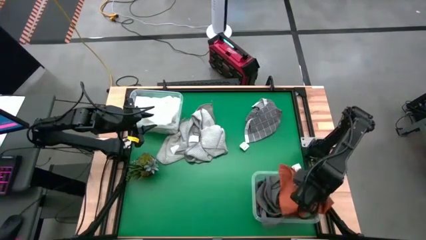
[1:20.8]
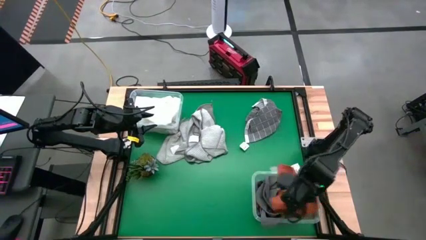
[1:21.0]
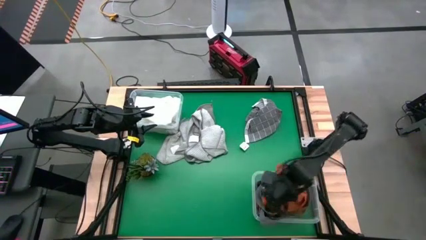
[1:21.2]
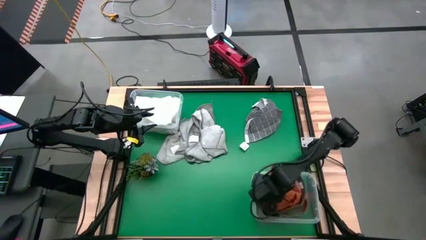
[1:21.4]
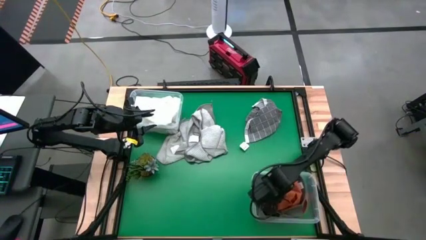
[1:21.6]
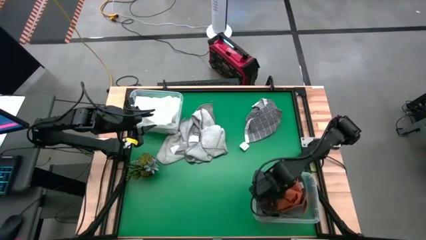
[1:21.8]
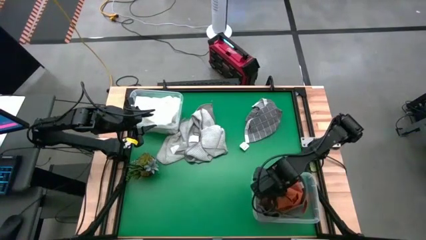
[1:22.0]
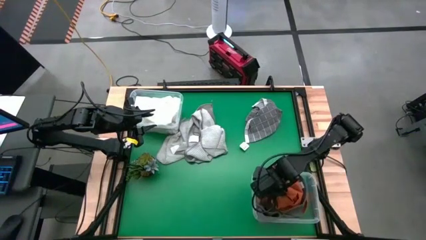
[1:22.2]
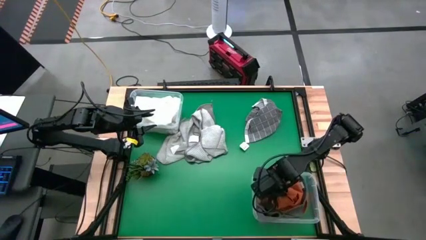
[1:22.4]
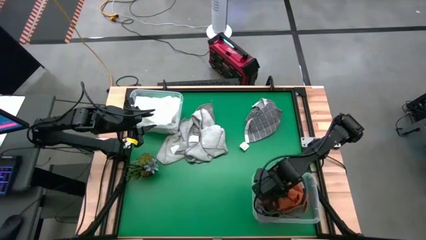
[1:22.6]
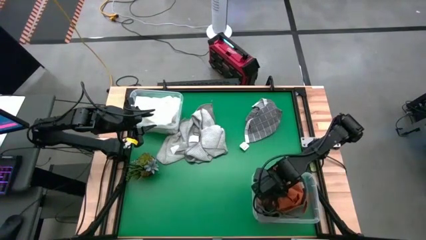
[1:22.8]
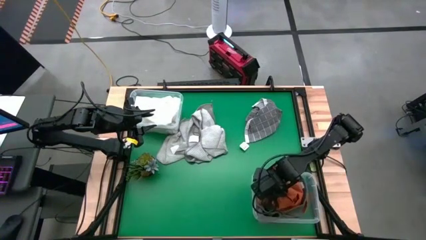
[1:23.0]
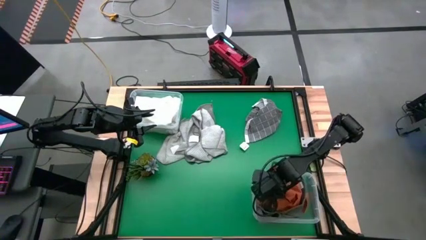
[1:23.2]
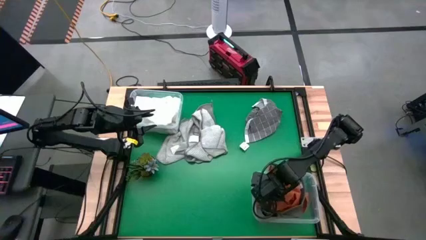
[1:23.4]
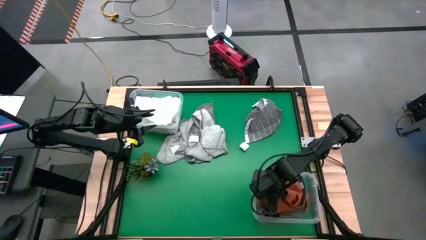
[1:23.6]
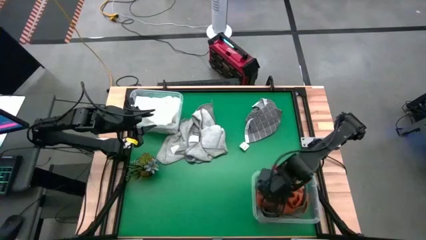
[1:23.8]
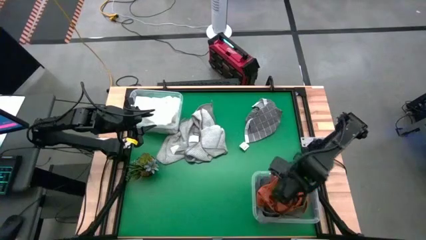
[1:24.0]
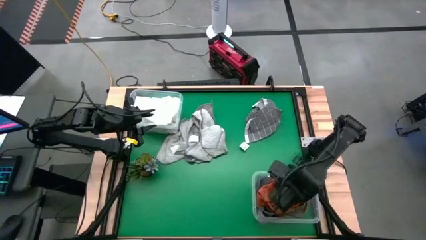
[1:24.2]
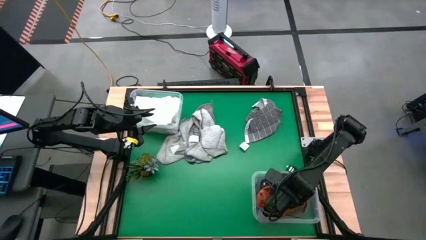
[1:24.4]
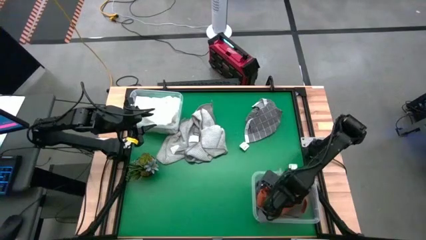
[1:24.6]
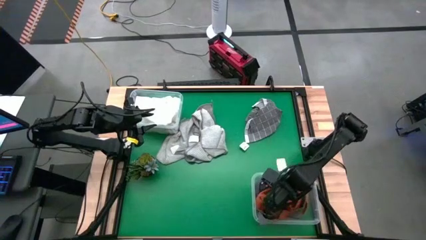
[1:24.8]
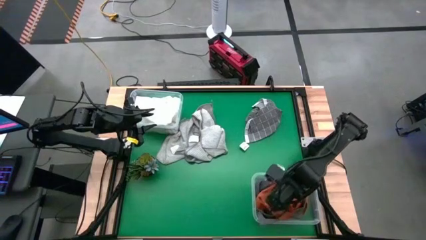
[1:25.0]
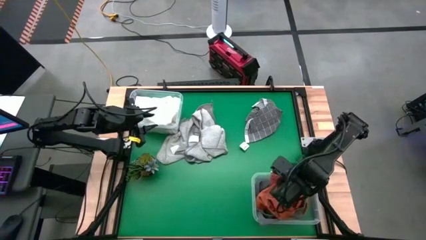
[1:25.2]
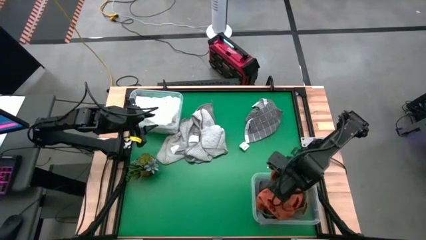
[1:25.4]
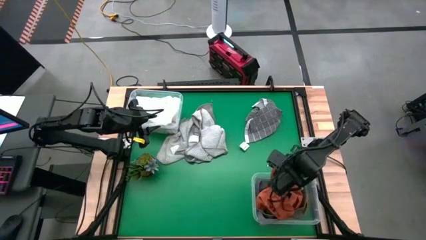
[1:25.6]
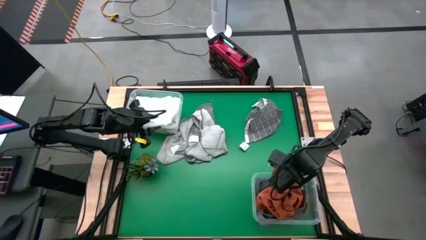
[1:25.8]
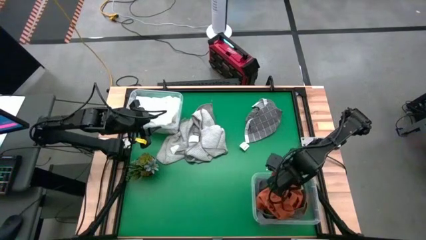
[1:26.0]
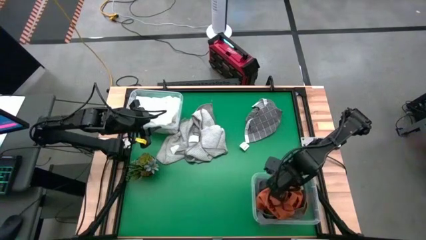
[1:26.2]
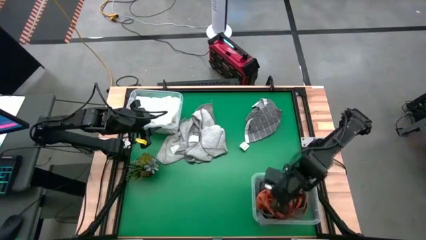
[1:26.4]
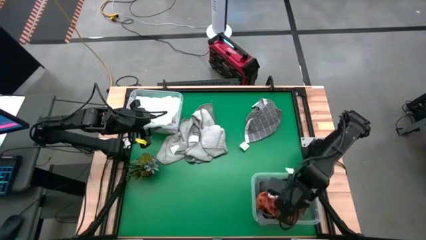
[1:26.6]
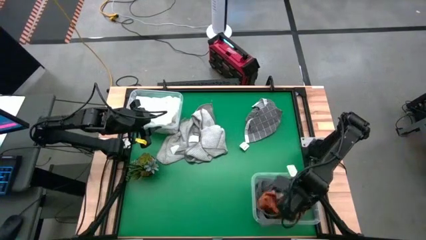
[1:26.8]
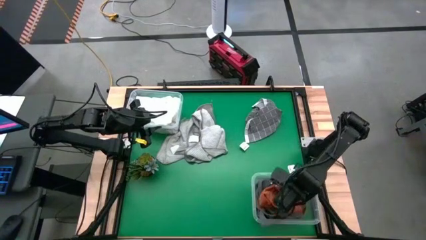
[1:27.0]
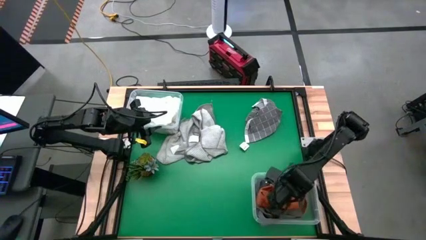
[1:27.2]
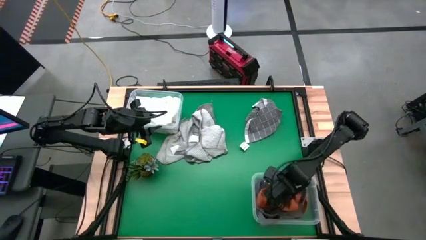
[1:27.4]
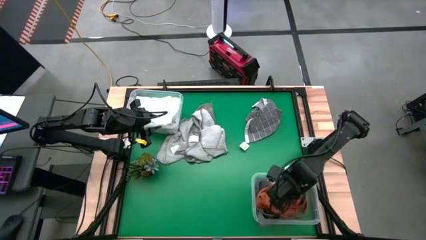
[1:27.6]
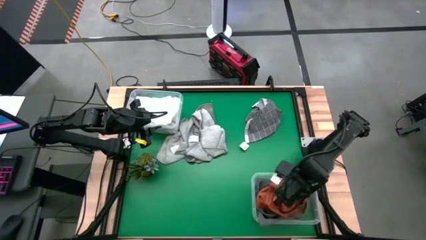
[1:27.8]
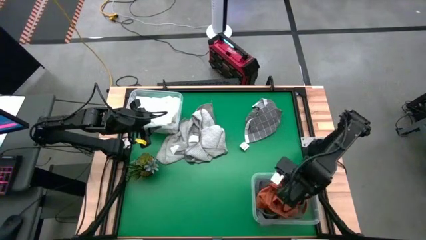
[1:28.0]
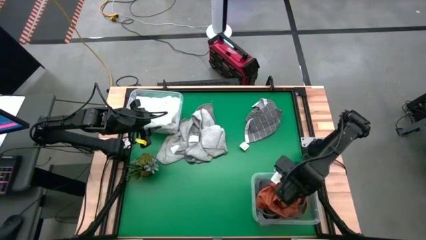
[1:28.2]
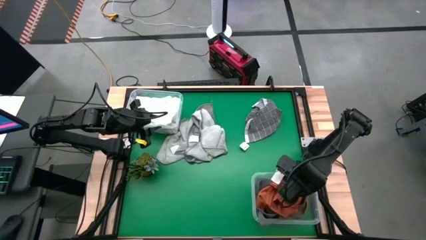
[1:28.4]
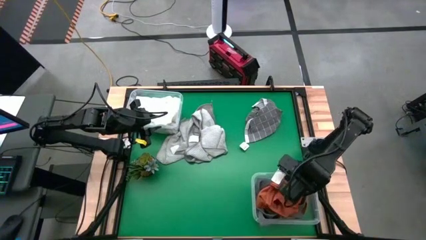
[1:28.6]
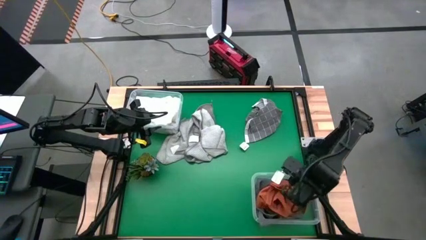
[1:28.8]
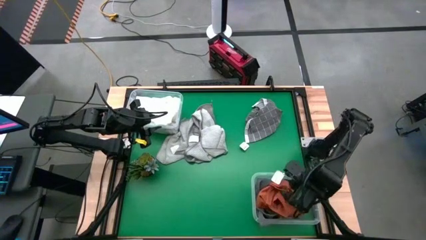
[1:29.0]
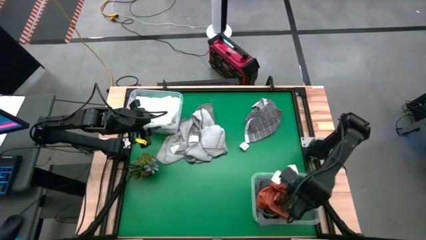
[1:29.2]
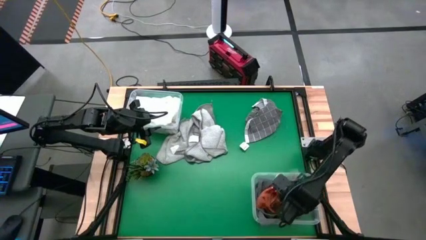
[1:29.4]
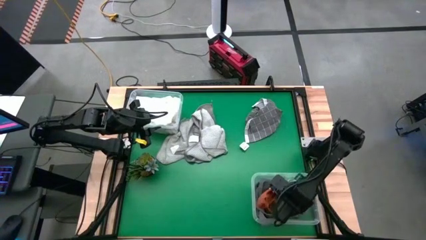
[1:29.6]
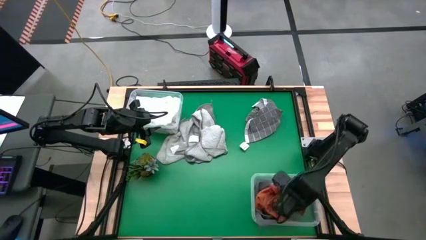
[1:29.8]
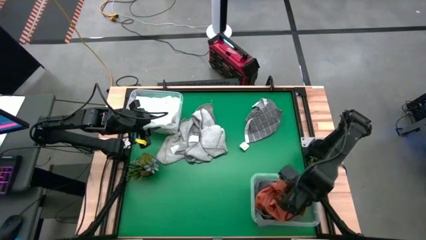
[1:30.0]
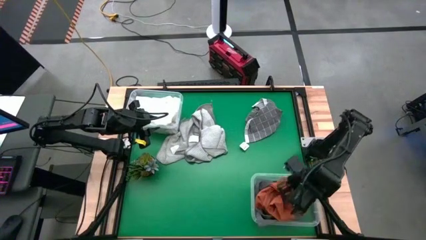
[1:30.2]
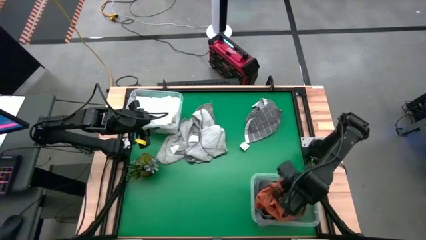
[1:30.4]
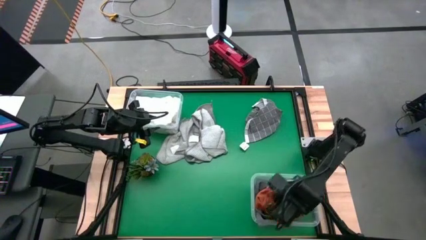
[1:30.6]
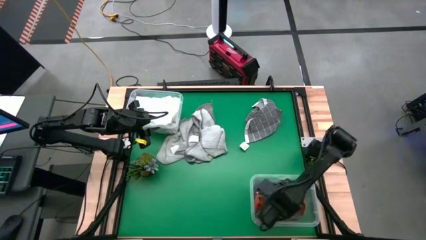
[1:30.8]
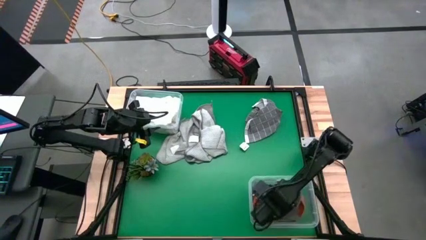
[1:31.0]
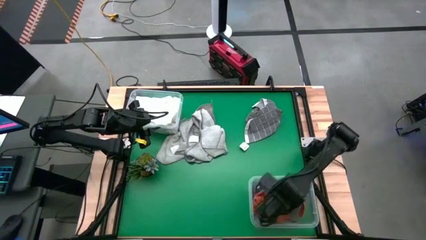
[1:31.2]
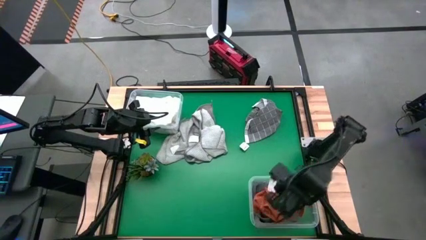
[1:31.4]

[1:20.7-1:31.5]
Task: Sort towels by color in basket
Put the orange towel into the bottom transparent bin
